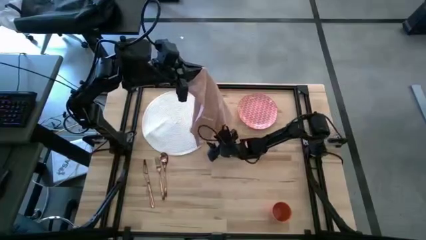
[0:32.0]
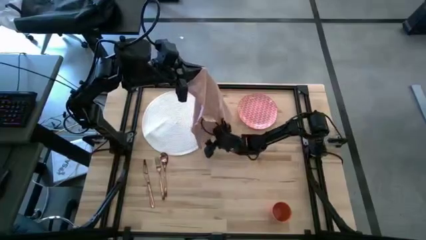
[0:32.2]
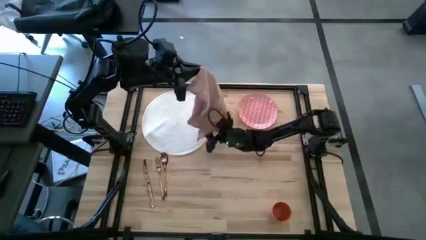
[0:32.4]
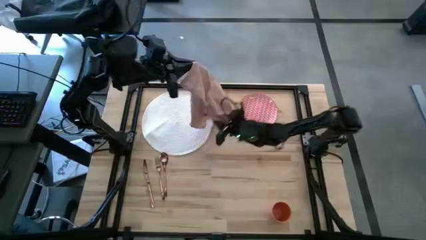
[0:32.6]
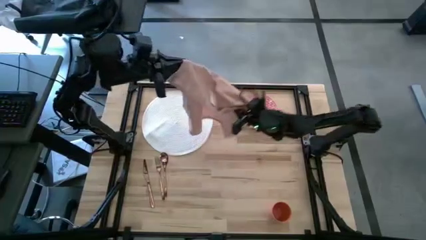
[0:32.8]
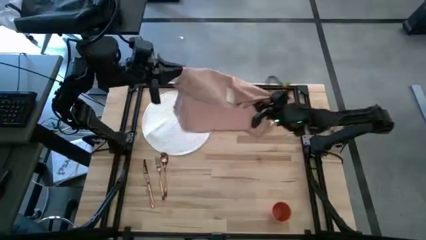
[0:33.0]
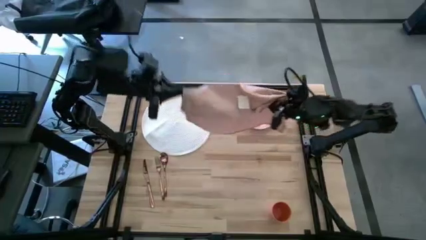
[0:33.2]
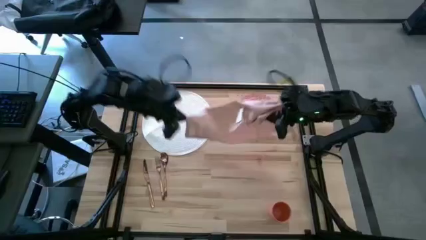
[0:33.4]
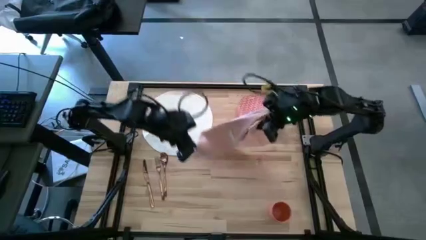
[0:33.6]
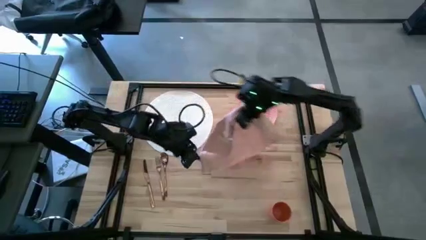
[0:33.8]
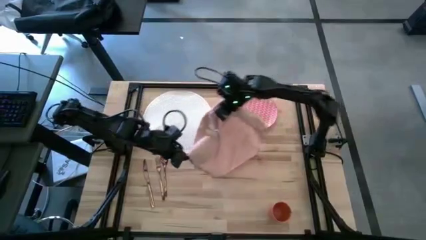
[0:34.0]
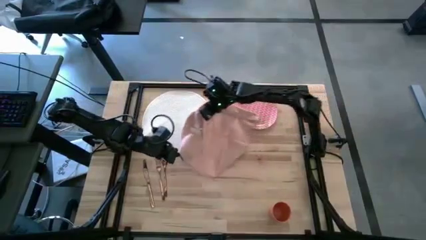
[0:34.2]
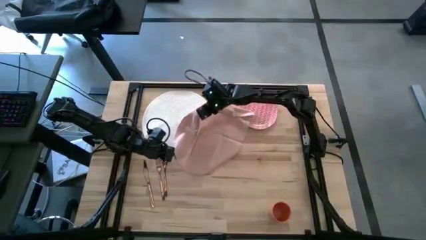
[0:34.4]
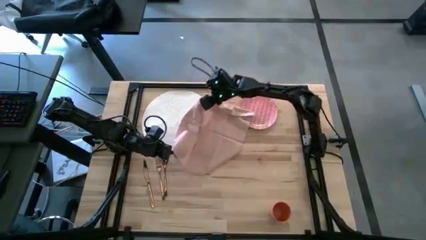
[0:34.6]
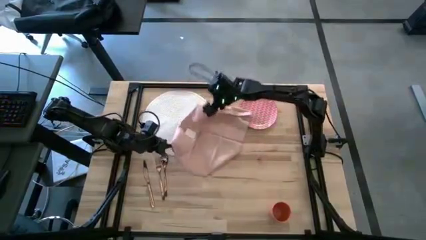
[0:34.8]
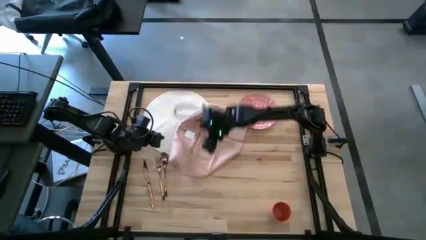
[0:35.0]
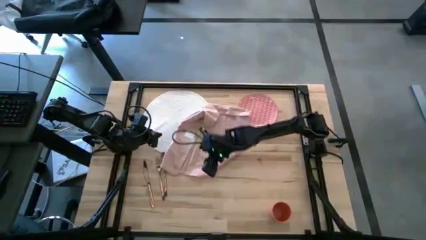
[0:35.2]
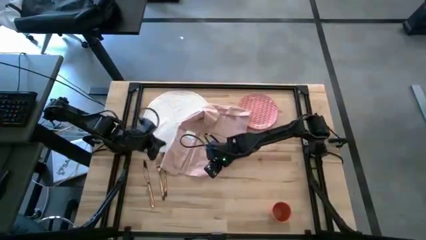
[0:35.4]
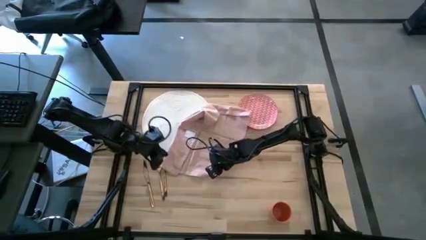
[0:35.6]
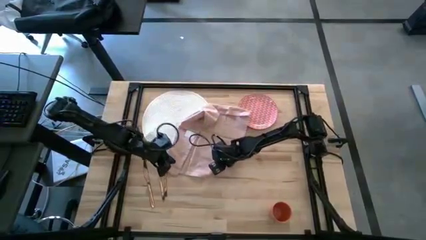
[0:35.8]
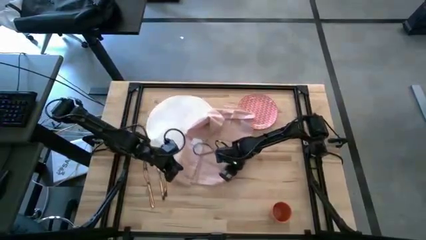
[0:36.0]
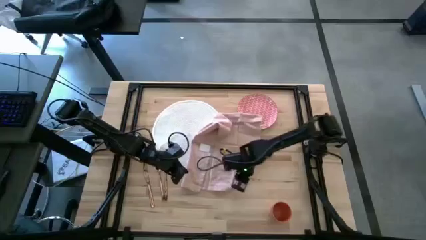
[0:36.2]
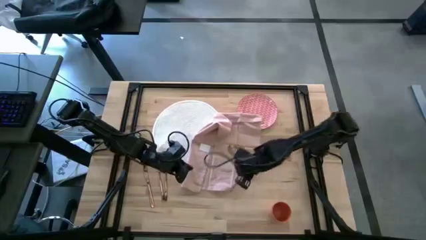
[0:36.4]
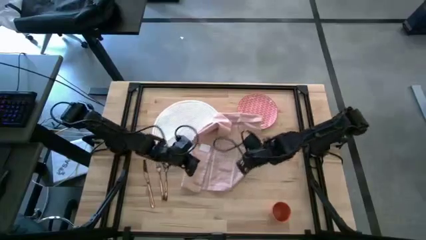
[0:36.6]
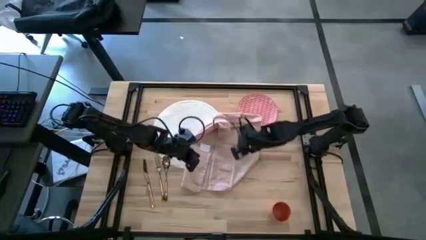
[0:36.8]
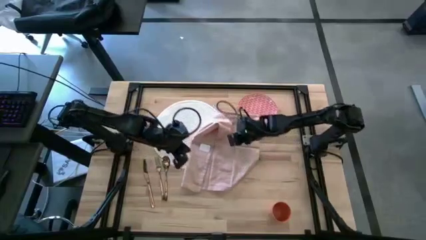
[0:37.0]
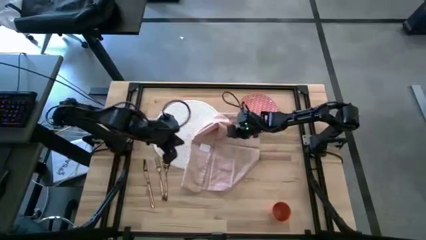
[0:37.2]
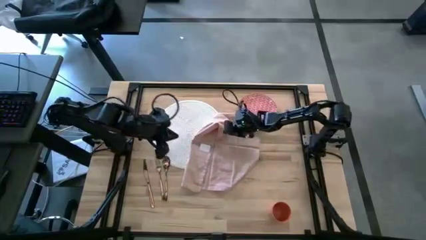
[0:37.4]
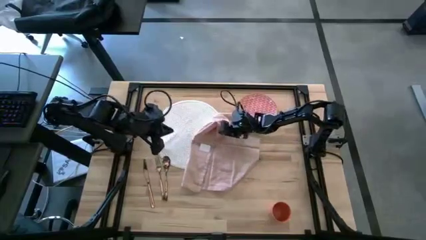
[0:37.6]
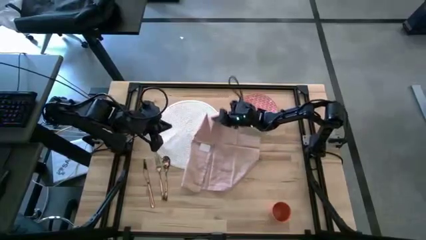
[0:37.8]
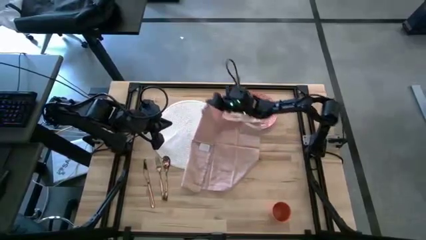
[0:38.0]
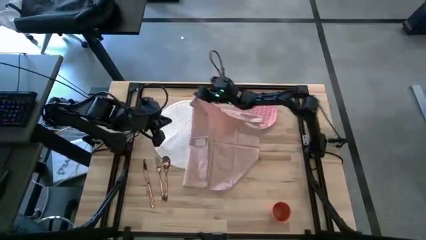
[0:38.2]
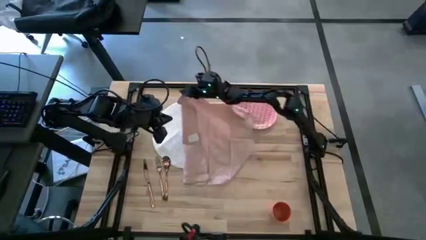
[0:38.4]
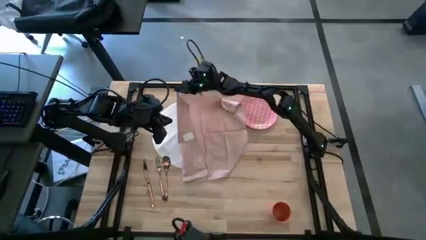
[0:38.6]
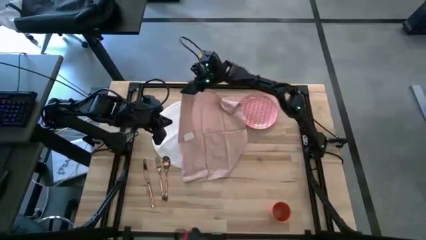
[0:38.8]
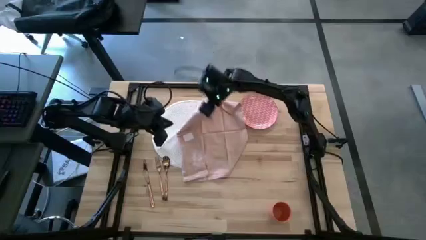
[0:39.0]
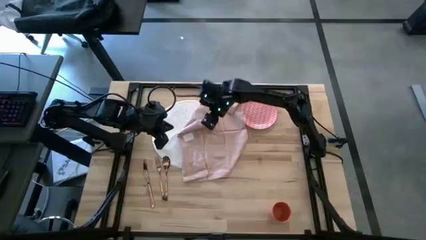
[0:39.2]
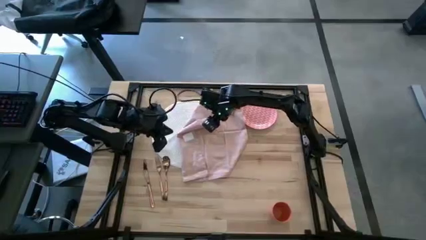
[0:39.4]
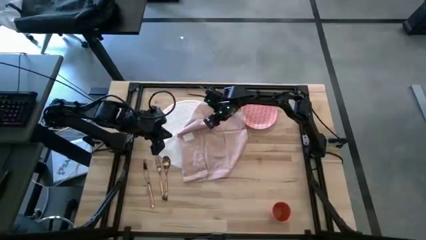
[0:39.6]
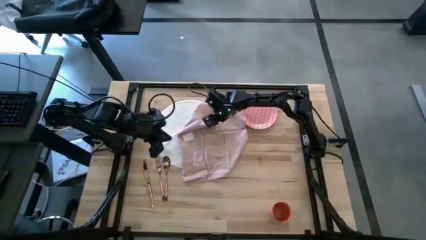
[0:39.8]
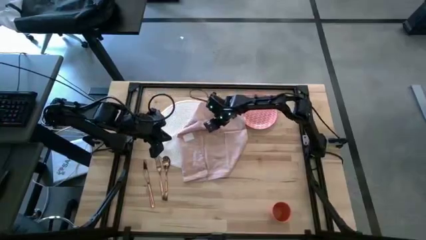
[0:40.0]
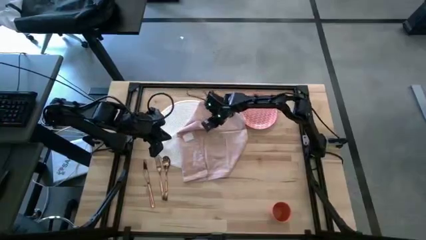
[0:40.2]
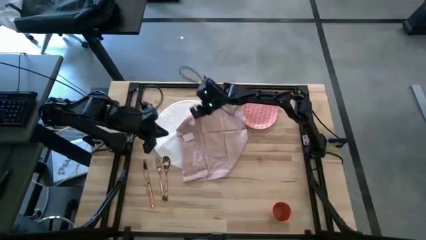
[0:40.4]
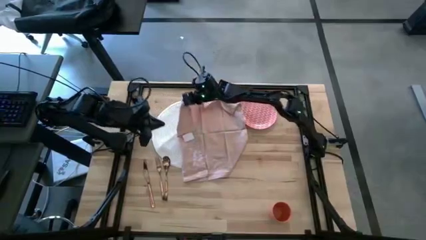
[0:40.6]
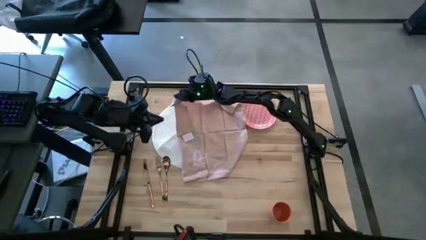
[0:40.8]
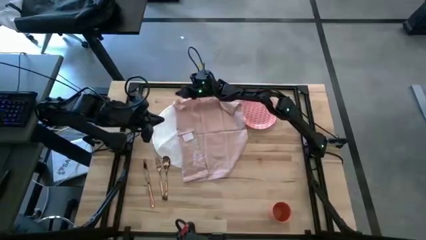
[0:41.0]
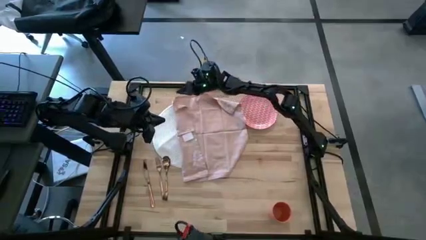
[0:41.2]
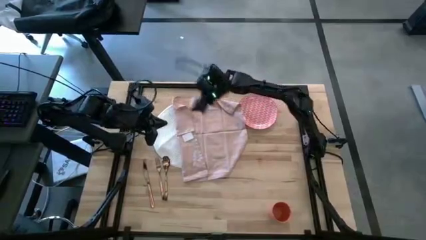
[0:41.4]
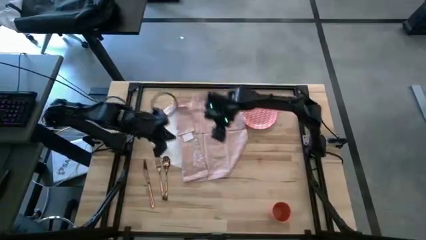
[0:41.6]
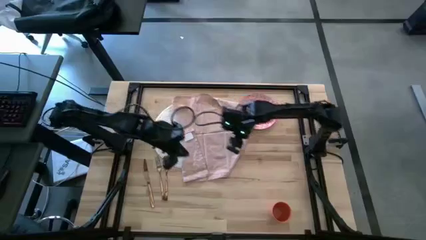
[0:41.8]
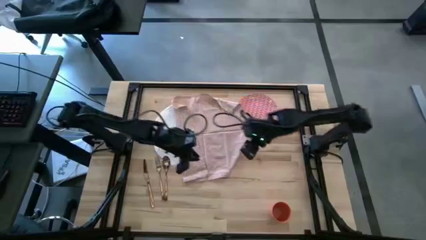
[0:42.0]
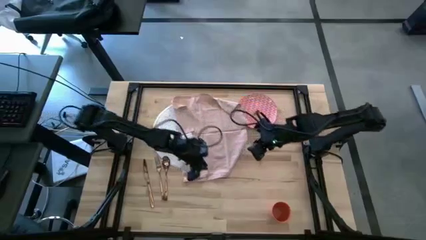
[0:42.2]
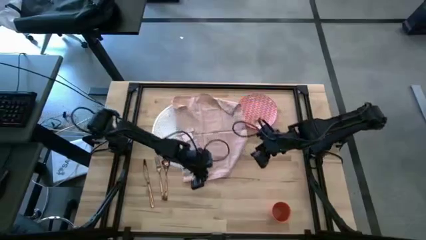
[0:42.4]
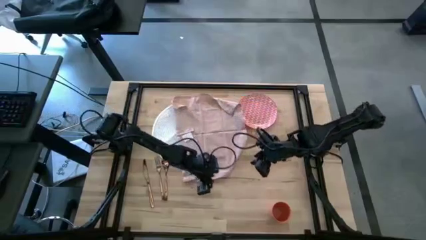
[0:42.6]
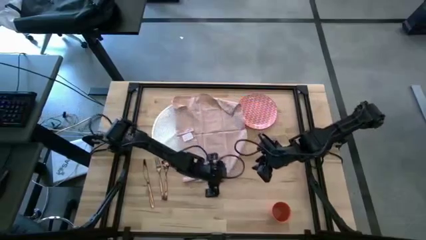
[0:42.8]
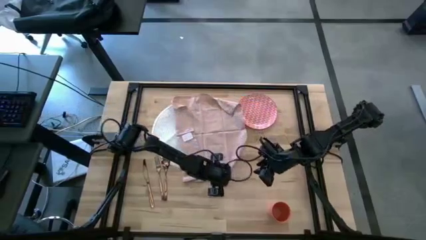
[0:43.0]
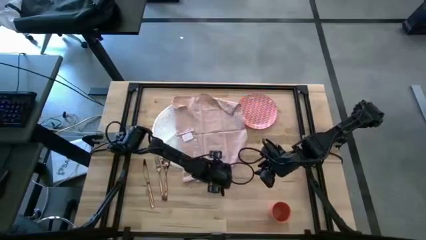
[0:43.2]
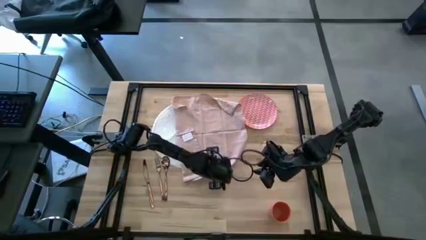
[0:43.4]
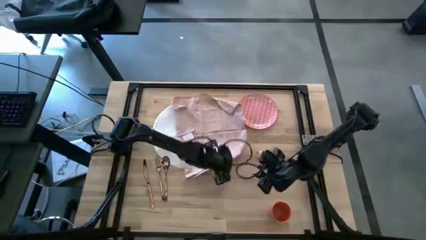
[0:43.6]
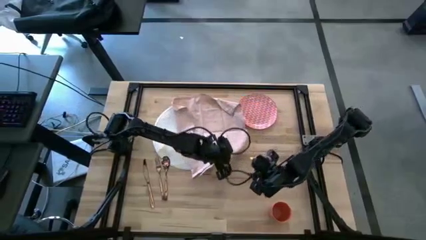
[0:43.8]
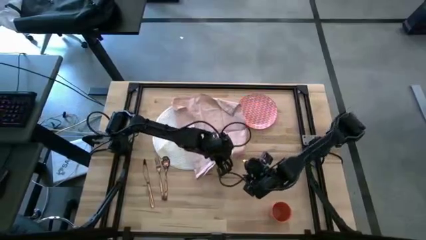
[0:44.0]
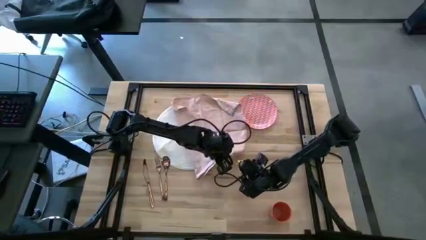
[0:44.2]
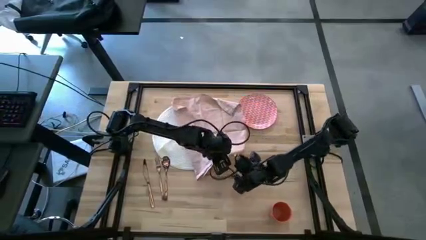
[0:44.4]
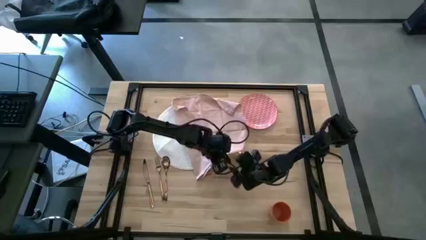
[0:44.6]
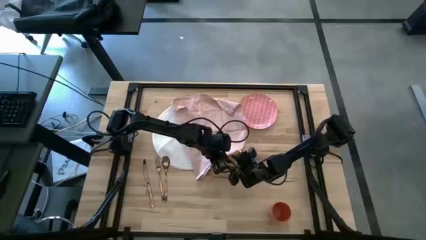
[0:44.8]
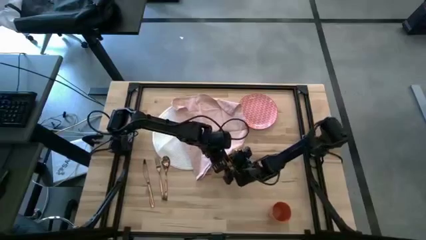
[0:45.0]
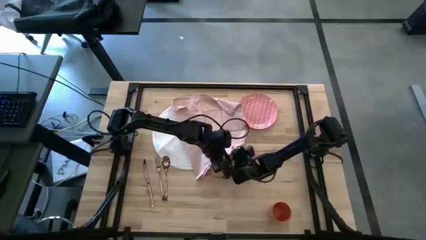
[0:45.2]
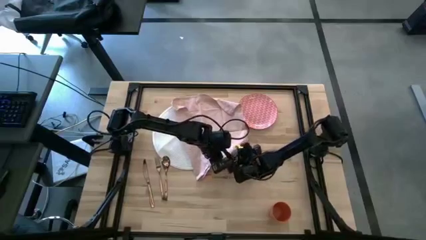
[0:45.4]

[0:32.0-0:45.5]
Task: Set table place
Fold the pink napkin

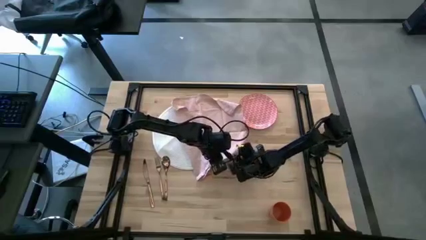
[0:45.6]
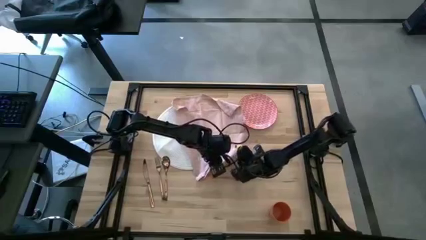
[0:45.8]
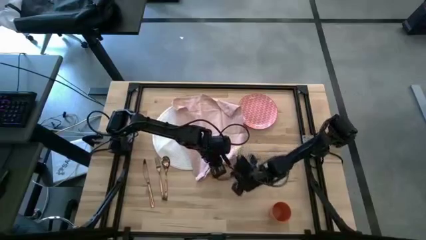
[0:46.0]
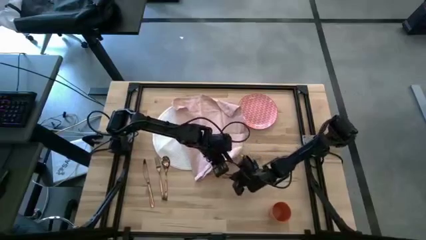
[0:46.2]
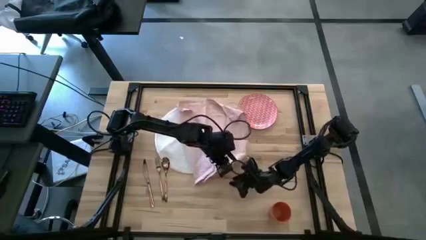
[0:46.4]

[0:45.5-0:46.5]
Fold the pink napkin

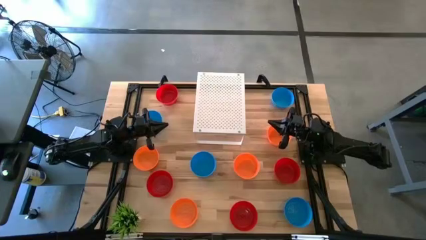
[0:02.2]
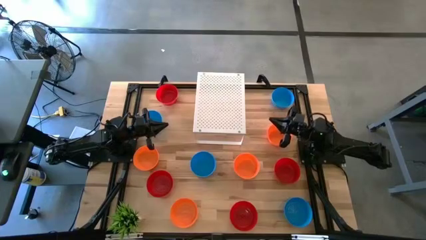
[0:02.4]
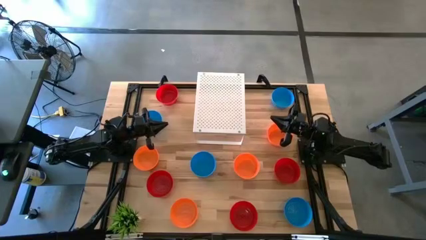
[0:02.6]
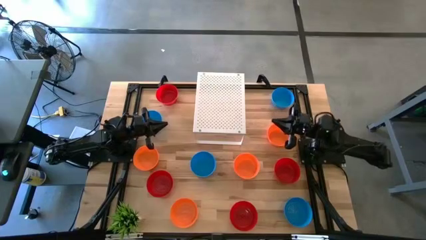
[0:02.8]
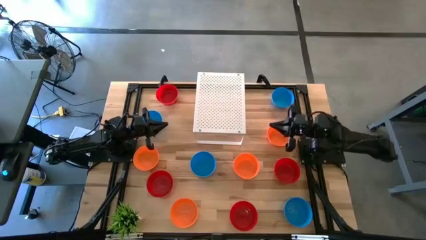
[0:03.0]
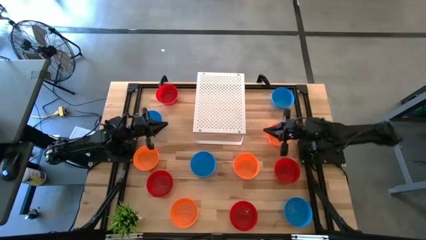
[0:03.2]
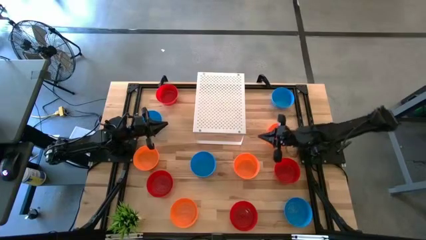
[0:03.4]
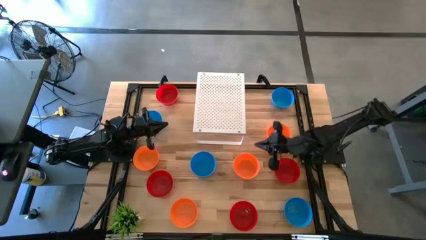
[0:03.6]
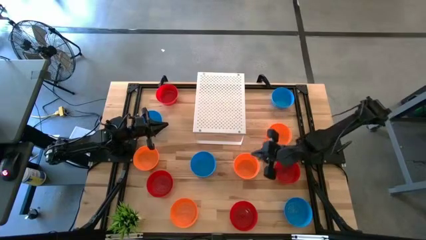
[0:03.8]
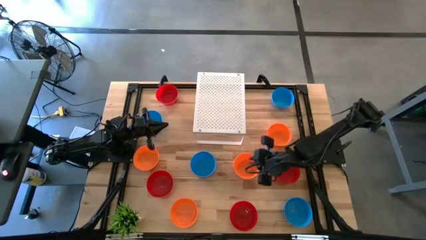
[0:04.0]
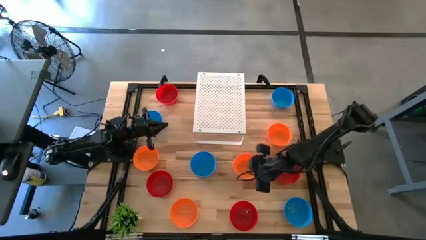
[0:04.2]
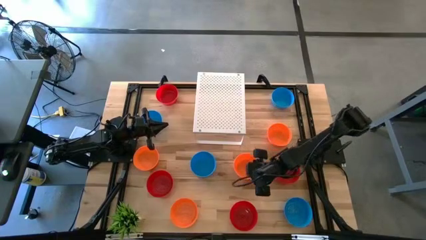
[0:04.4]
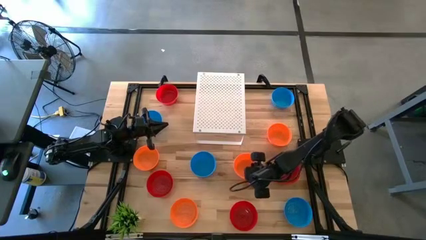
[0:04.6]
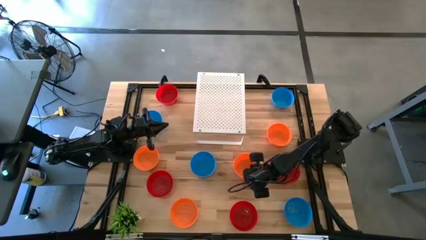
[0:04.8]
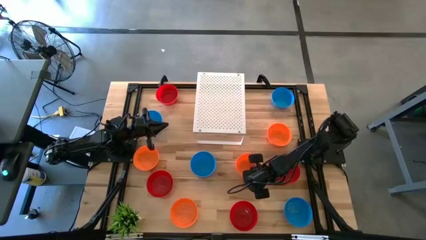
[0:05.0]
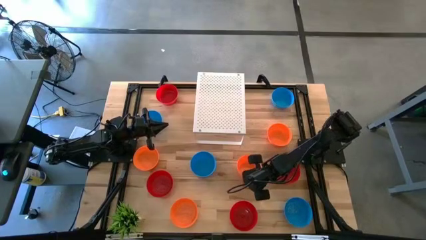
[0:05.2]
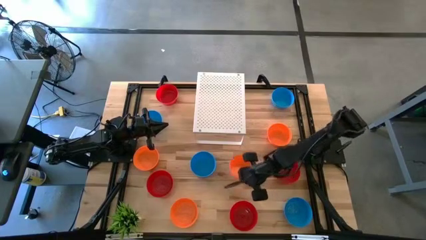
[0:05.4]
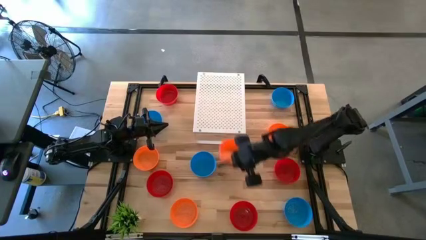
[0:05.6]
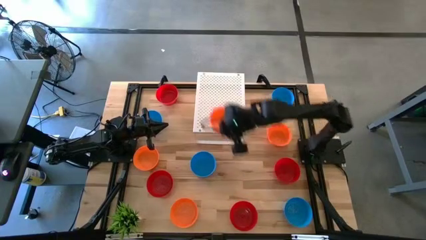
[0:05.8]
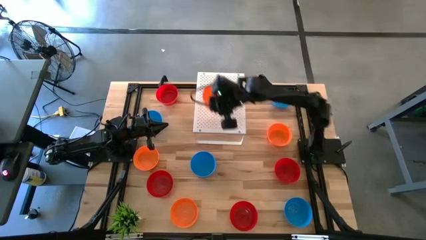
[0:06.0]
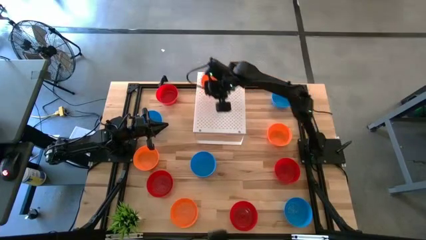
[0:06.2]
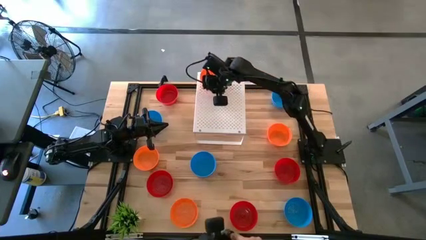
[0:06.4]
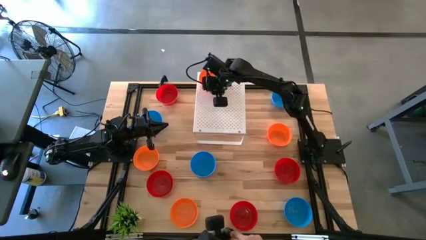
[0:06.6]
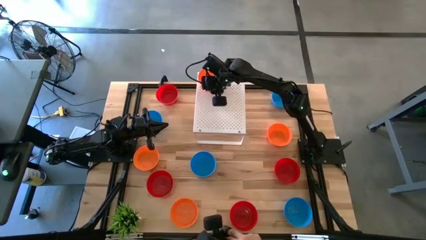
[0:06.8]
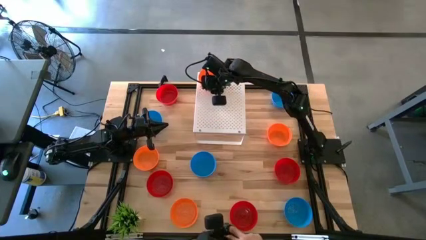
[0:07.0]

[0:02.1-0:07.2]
Task: Pick & Place Mini bowls
Put the orange bowl on the shelf
